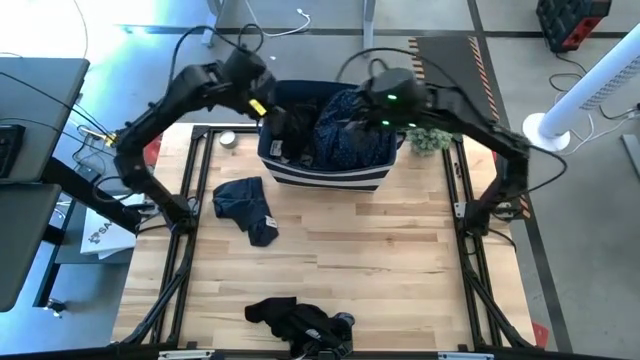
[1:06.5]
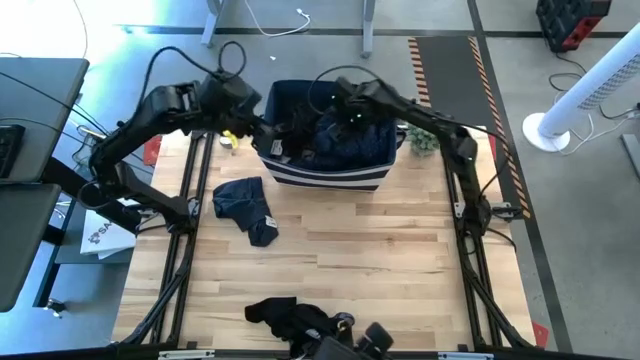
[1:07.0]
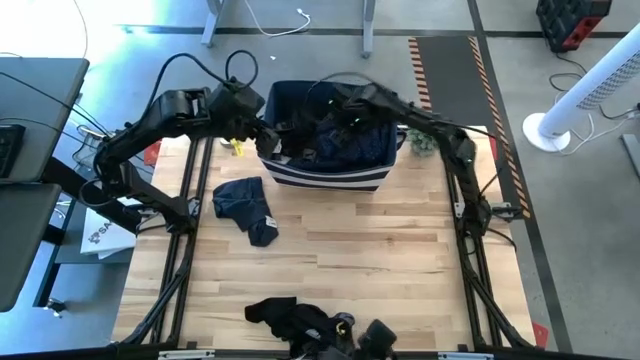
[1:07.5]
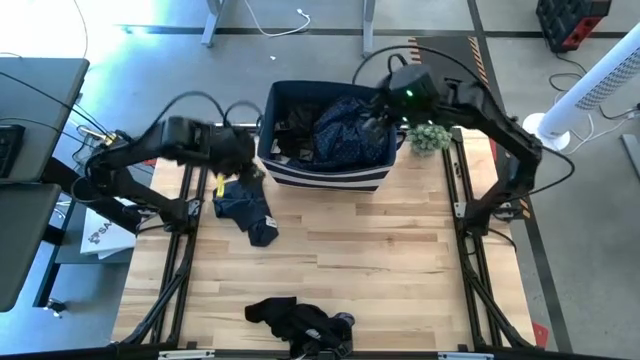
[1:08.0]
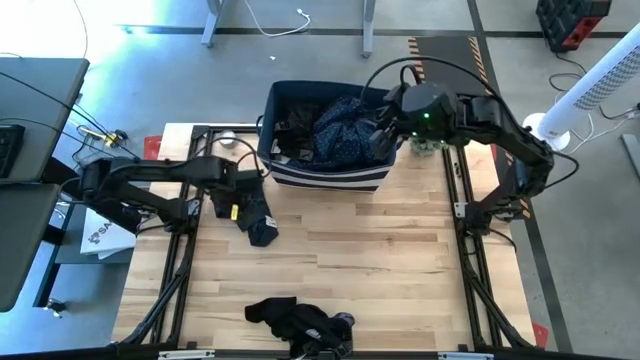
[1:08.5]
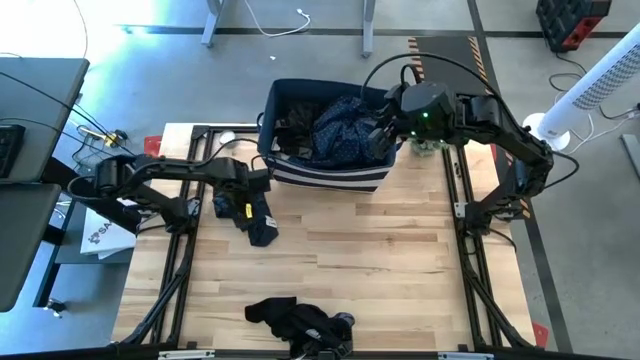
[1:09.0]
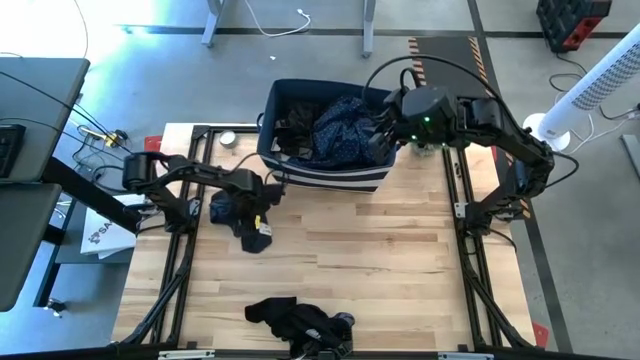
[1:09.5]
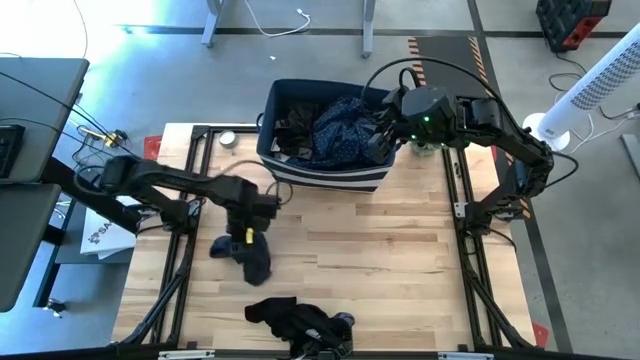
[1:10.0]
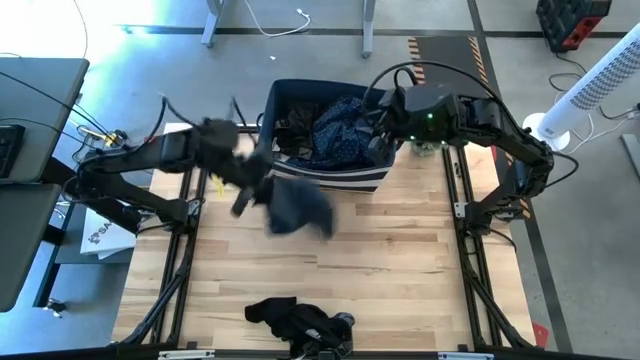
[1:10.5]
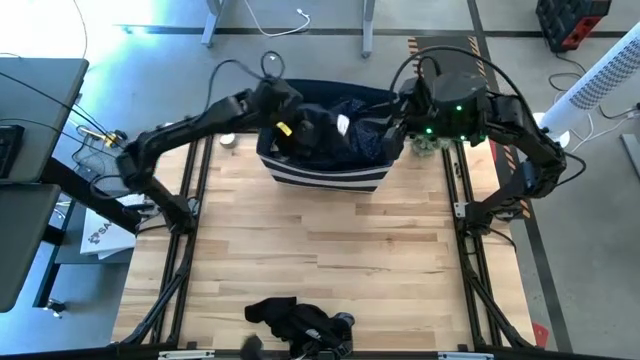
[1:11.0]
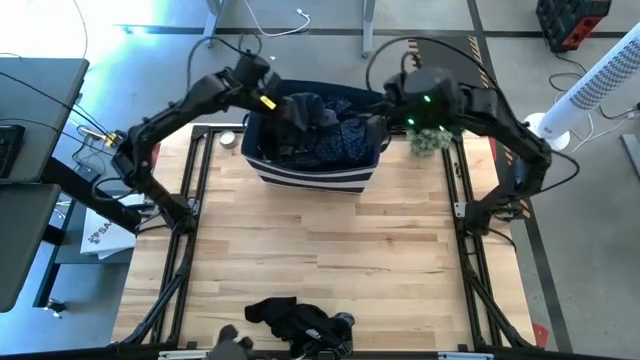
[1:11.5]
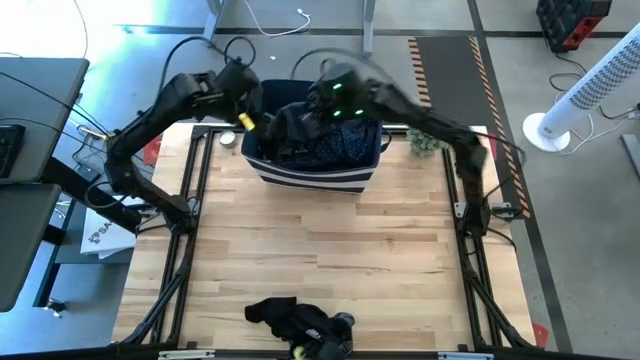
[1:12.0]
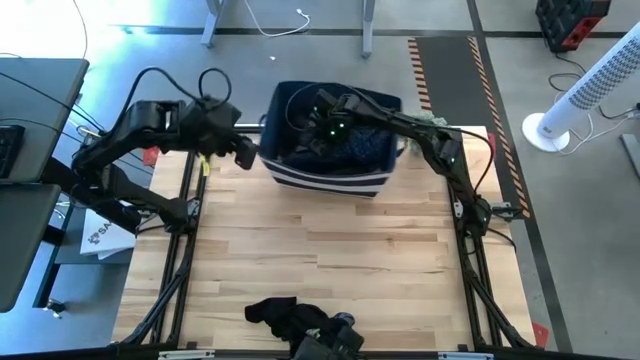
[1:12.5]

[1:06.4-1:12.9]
Task: Sort clothes
Put the grey boxer into the laundry bin

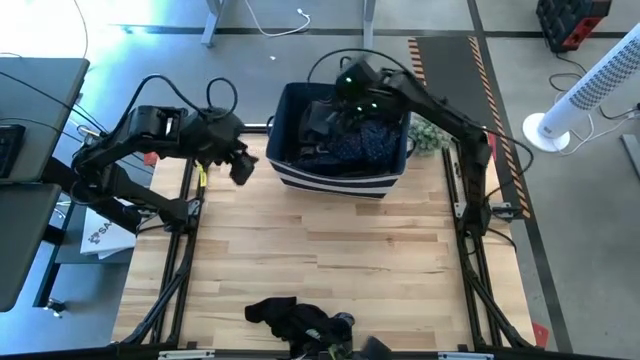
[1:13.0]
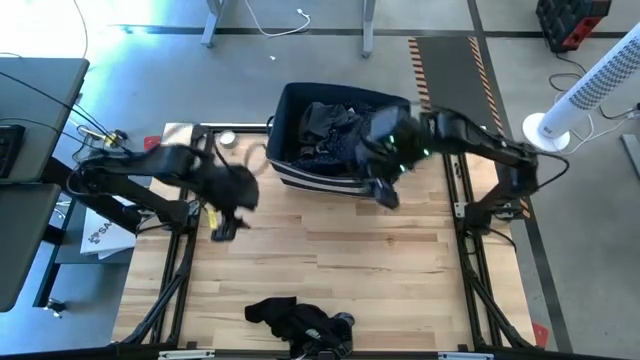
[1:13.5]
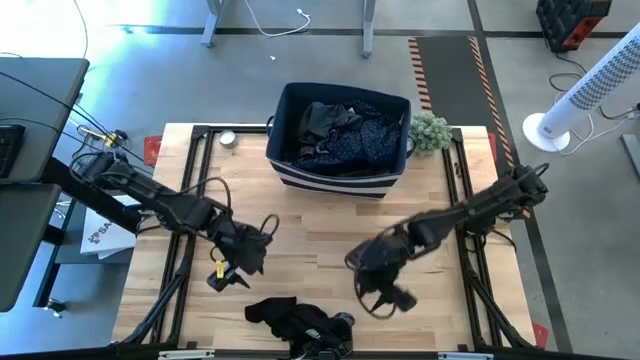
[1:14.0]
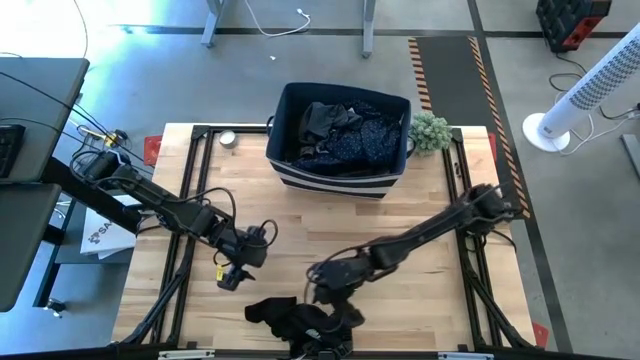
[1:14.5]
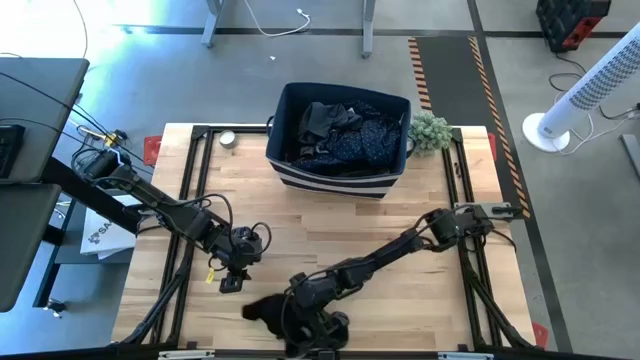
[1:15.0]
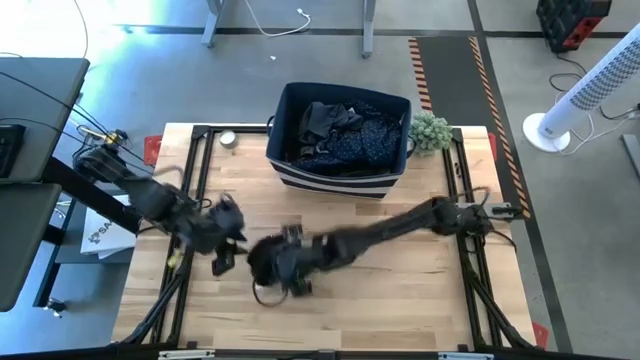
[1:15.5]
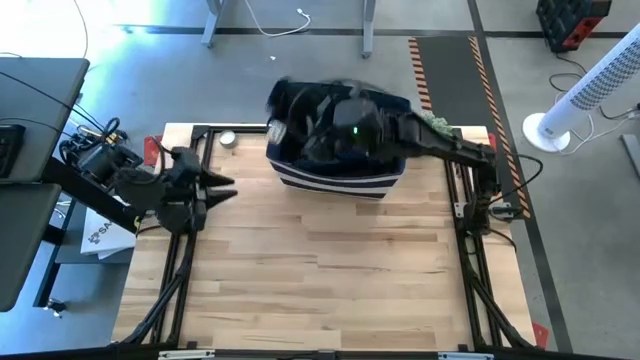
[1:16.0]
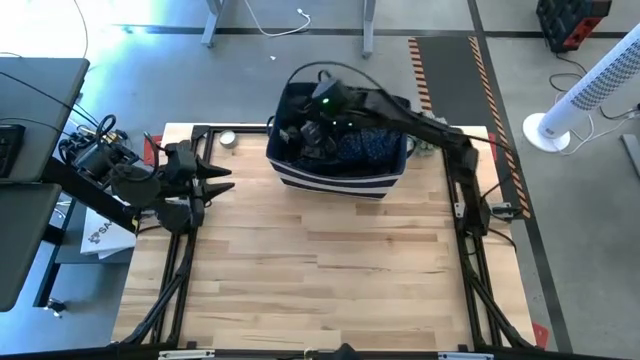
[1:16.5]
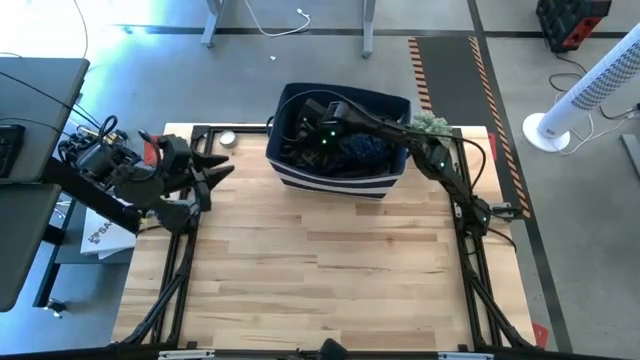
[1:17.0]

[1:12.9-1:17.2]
Put the black boxer into the laundry bin

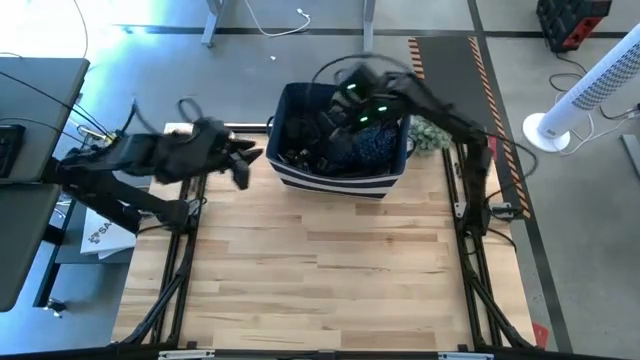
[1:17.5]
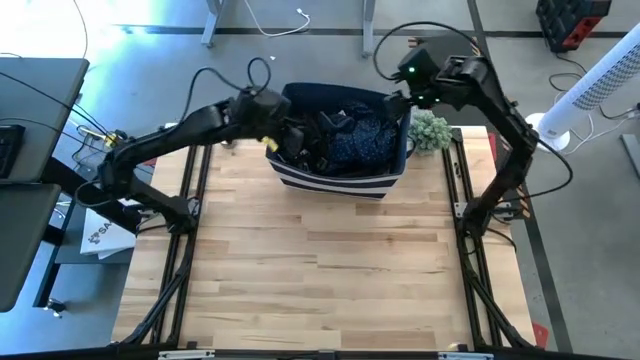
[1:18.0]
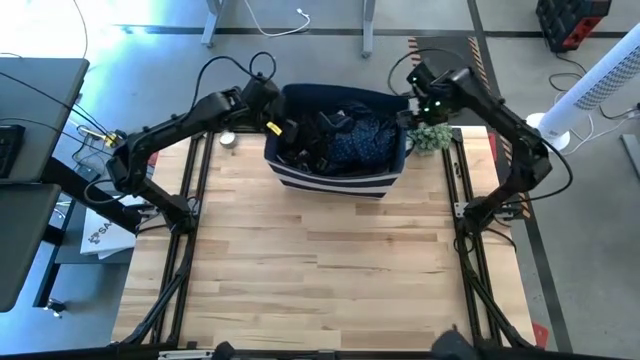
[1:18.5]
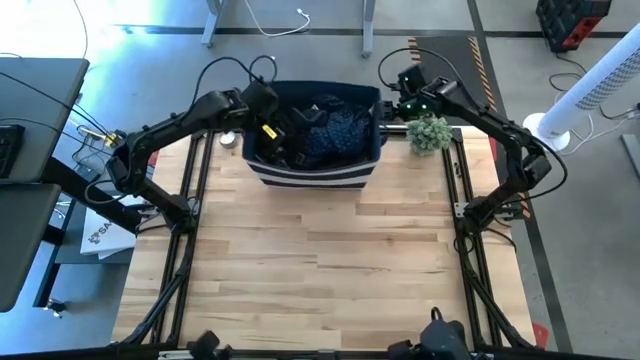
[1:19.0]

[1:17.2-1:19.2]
Adjust the laundry bin slightly to the left

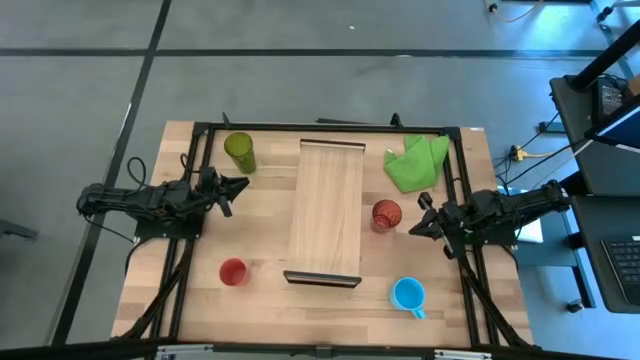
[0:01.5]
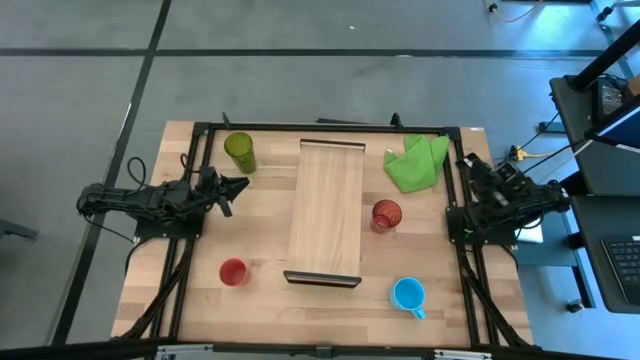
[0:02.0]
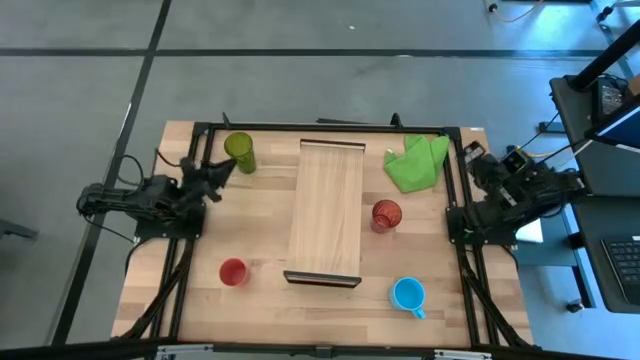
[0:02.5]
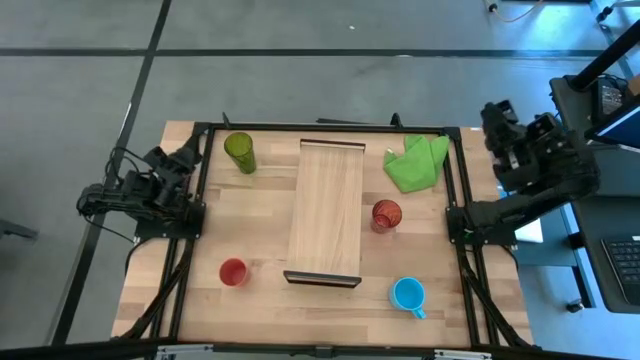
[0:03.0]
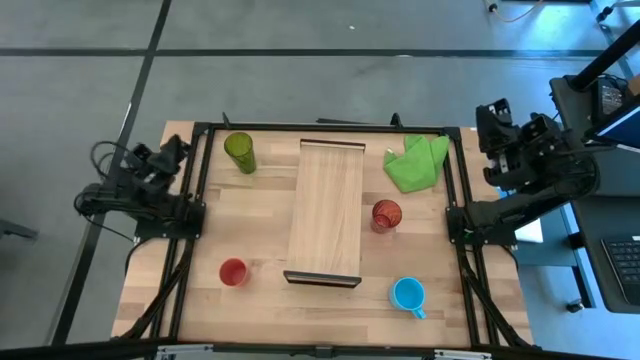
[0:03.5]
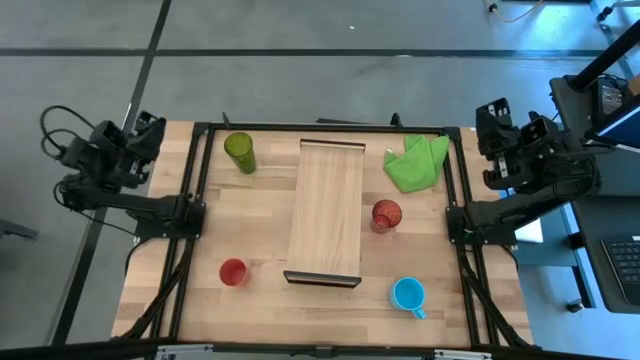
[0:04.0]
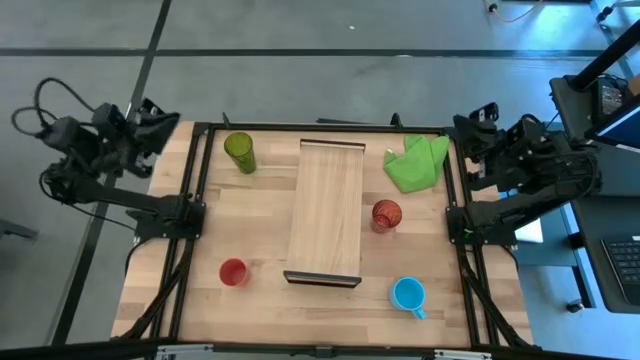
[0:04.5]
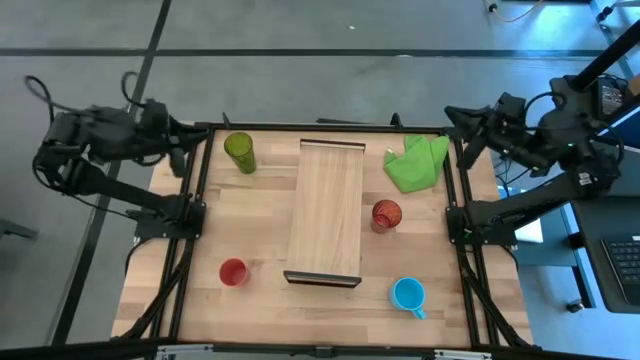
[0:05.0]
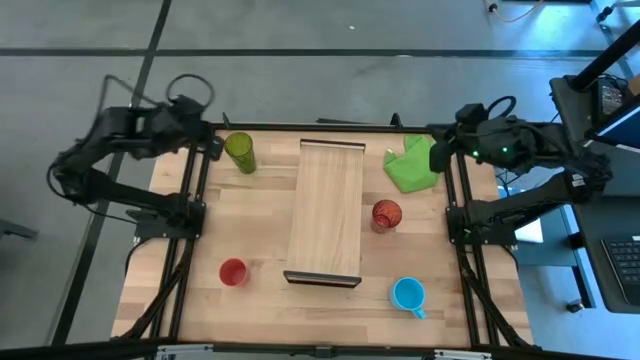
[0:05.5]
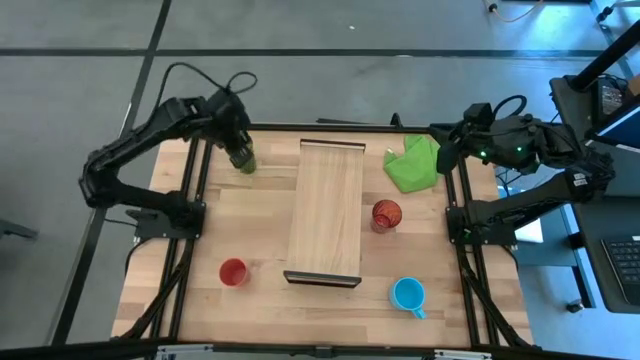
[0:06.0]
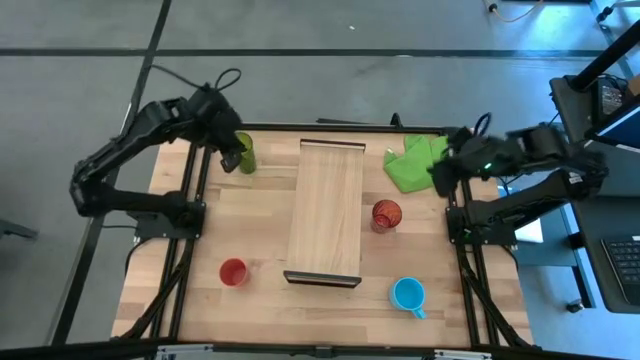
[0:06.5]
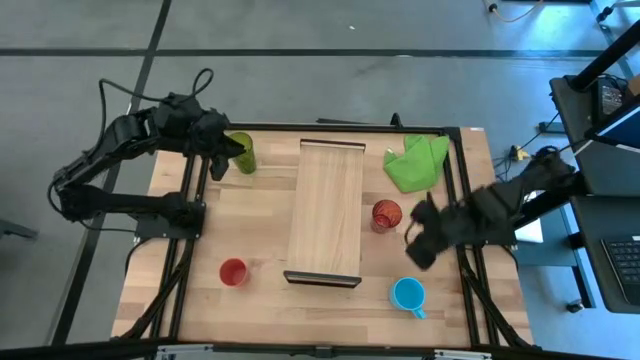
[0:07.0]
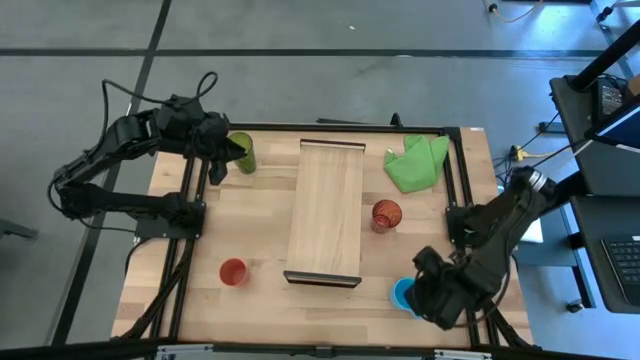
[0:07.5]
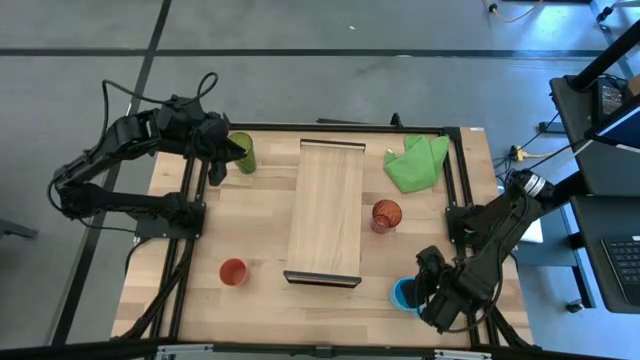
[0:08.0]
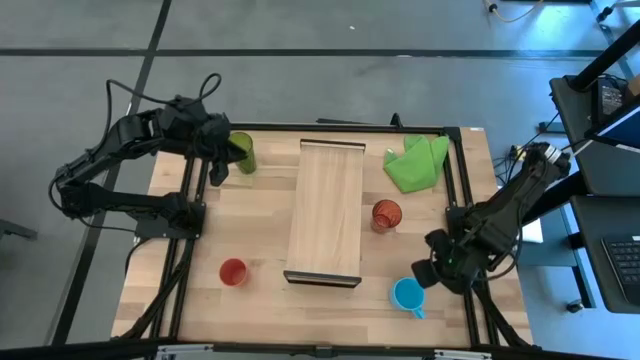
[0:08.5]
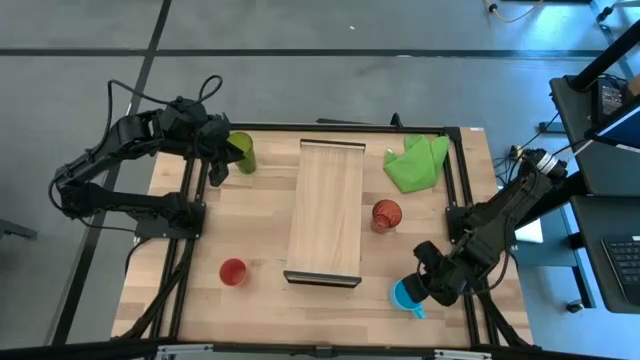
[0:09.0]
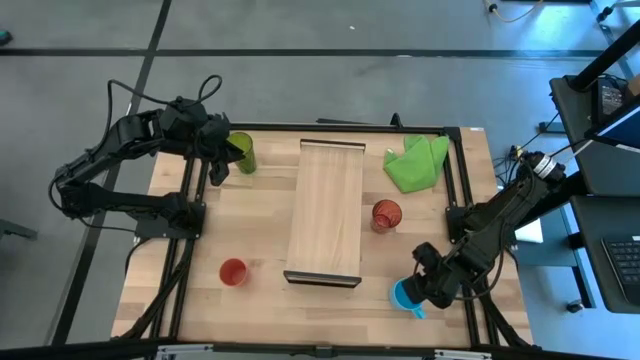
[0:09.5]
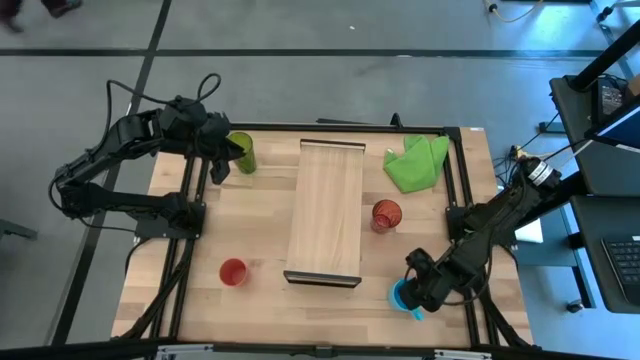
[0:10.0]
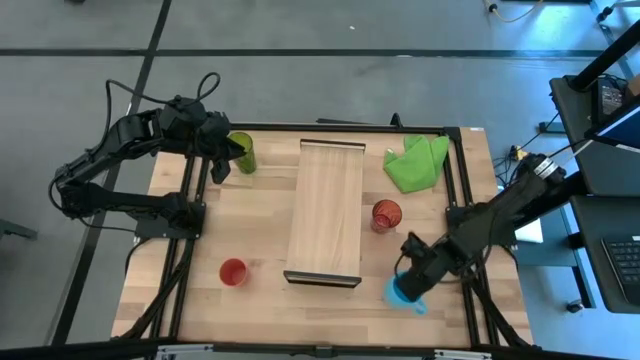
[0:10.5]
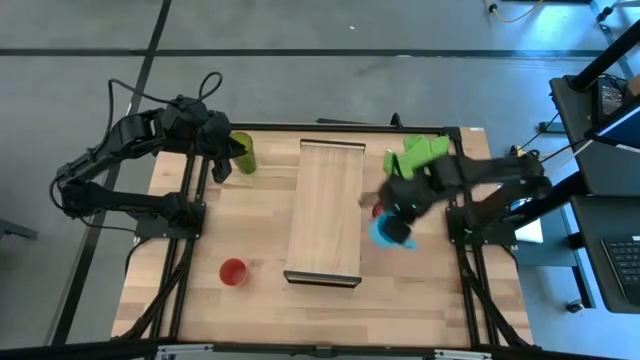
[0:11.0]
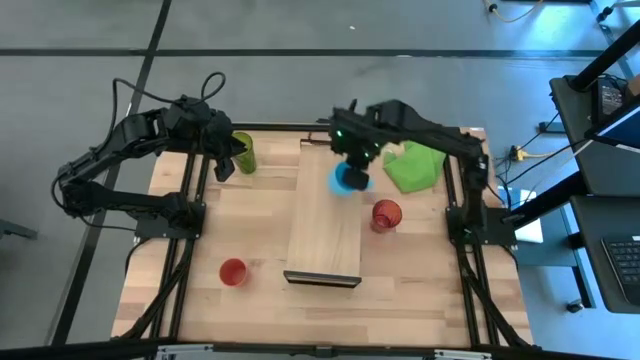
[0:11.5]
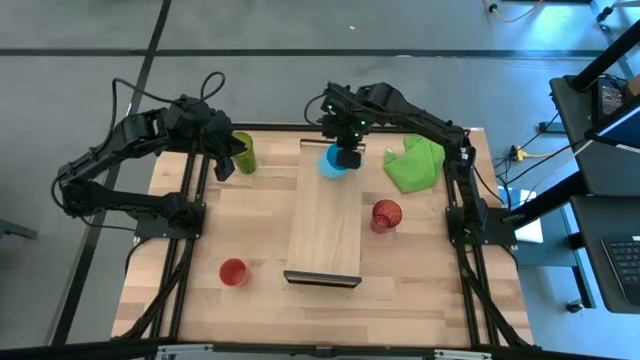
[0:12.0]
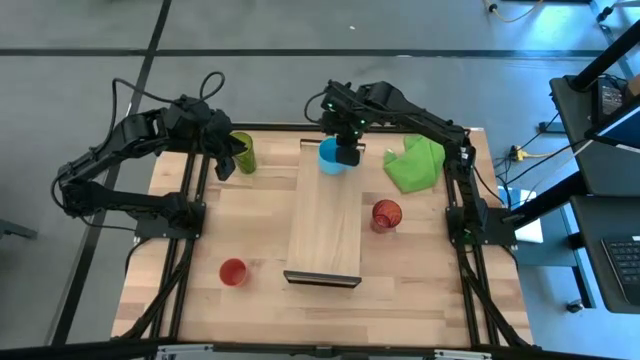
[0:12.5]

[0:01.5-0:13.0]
Task: Stack small to large cups/mugs on shelf
Put the blue mug on the shelf
